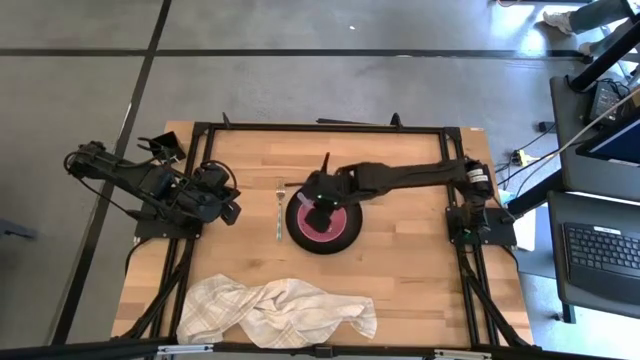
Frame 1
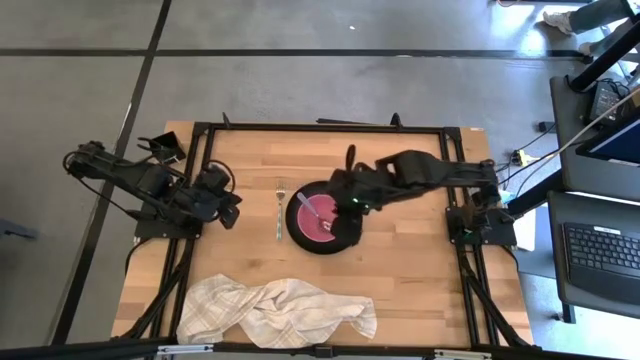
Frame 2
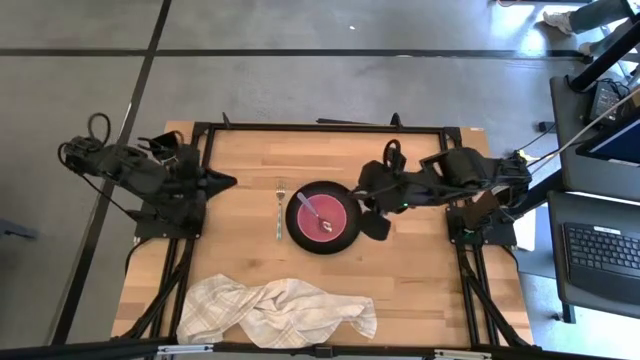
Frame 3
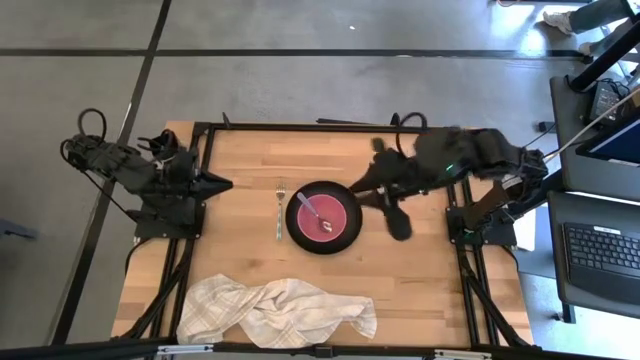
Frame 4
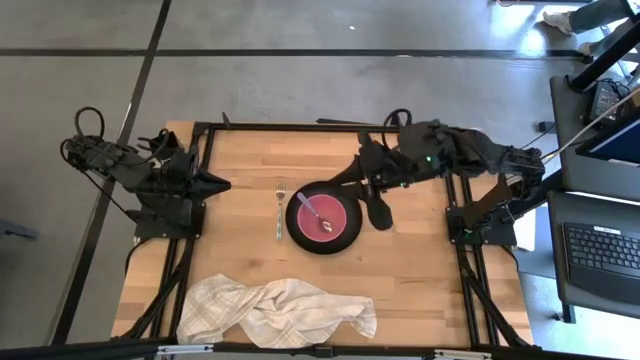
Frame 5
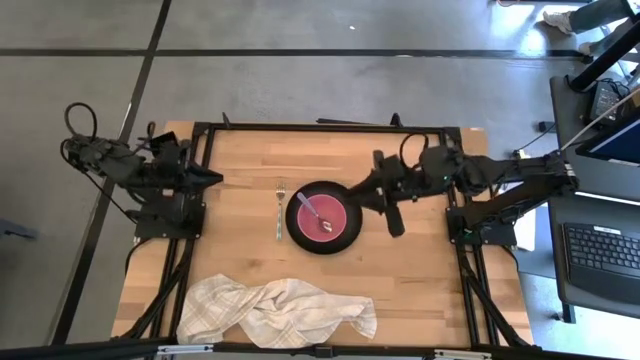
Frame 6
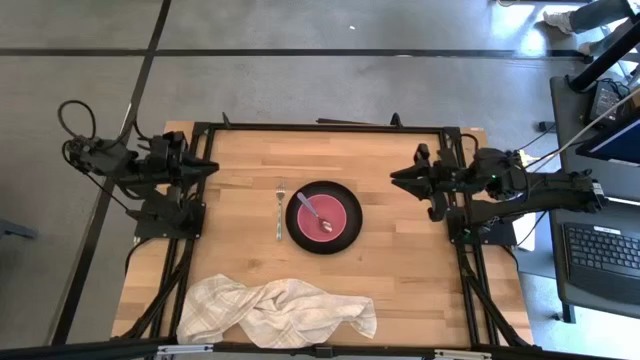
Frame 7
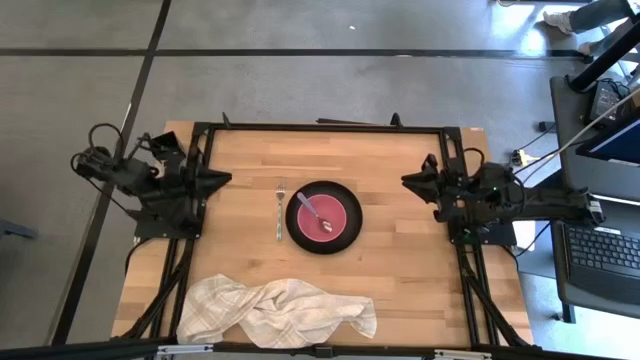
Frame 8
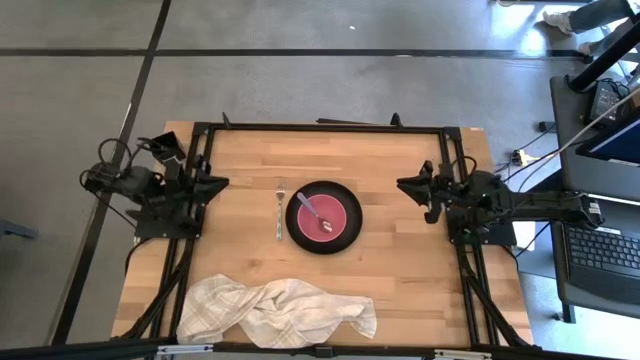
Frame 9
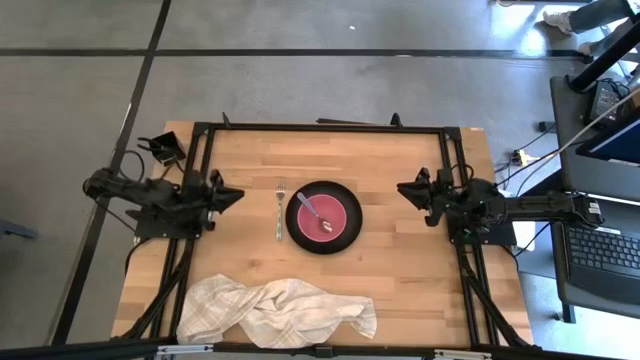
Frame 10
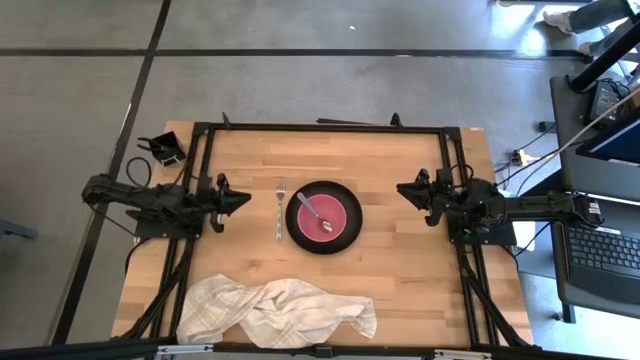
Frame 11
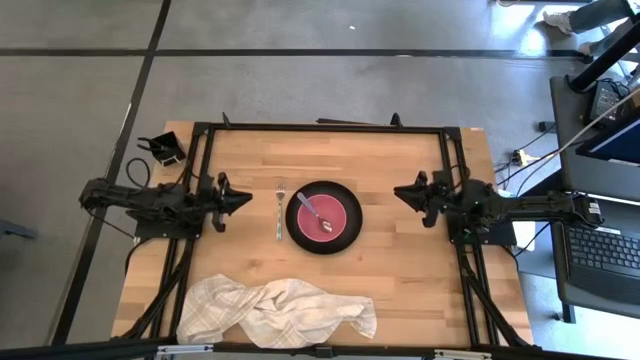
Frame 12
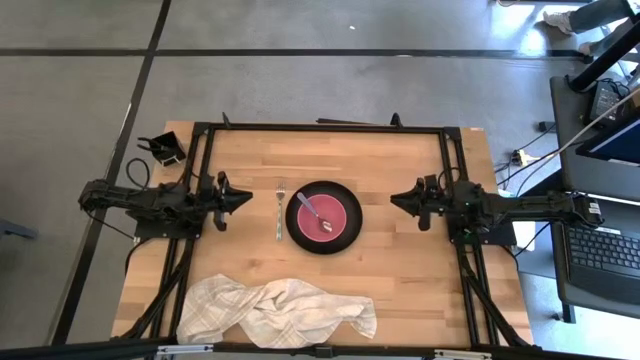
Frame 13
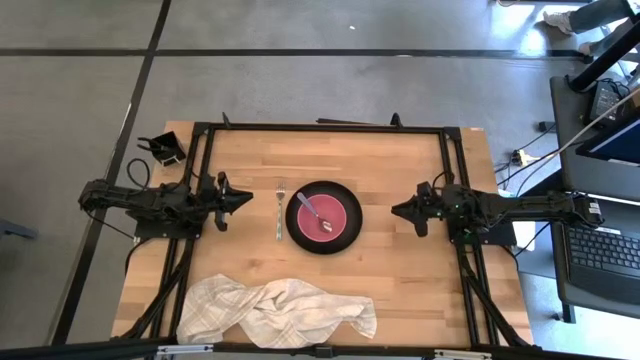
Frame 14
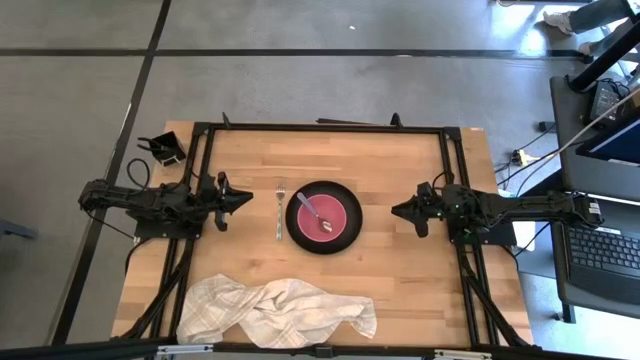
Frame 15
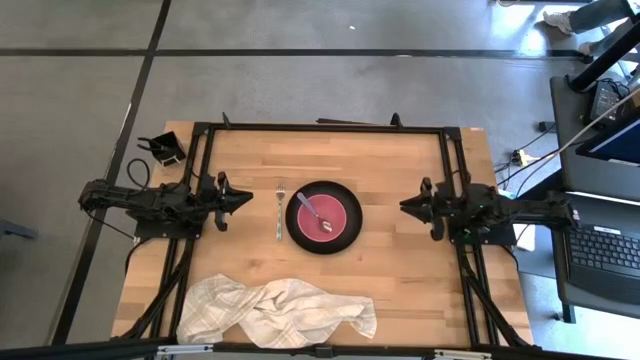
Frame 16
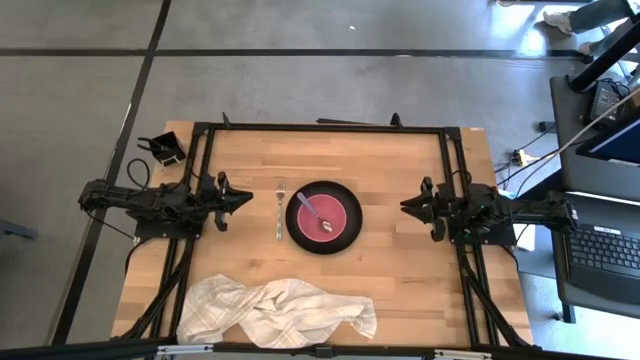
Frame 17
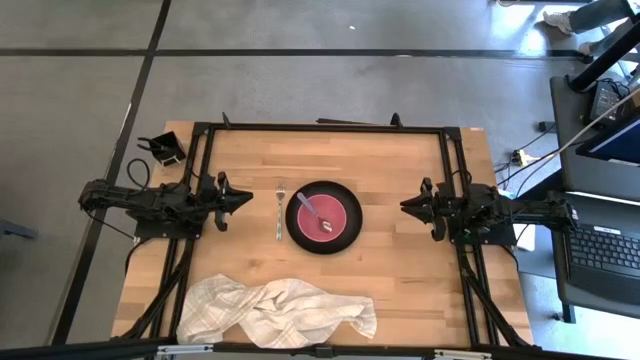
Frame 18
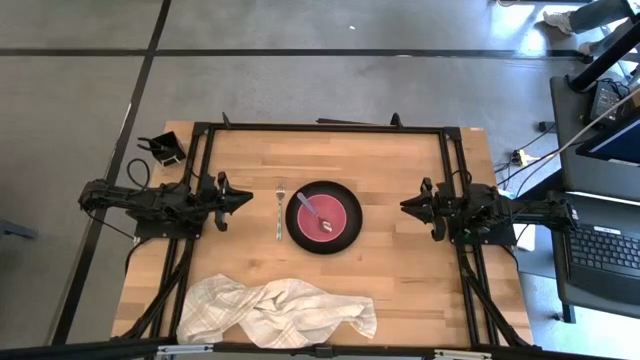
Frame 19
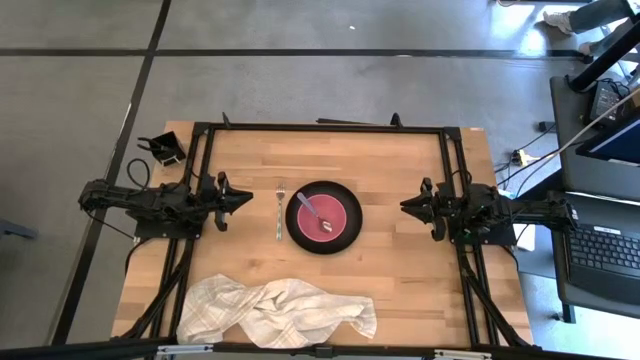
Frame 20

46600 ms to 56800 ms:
Task: Set table place
Return to Home Position

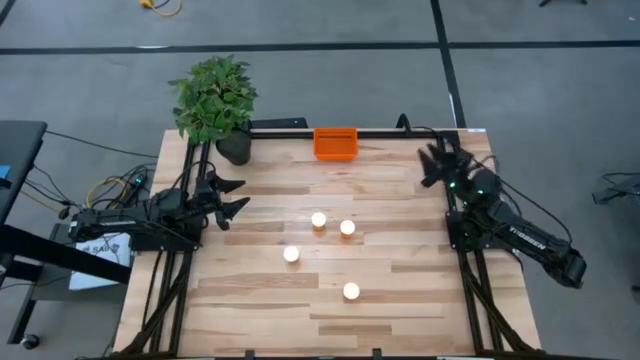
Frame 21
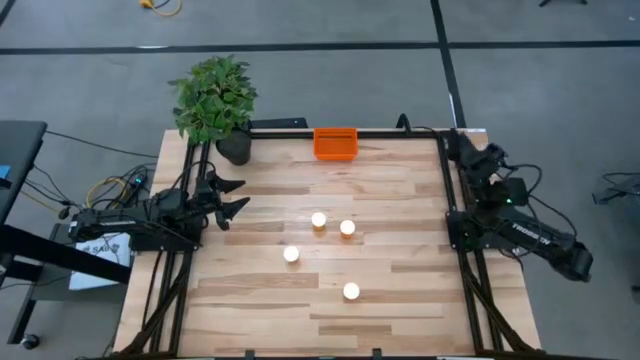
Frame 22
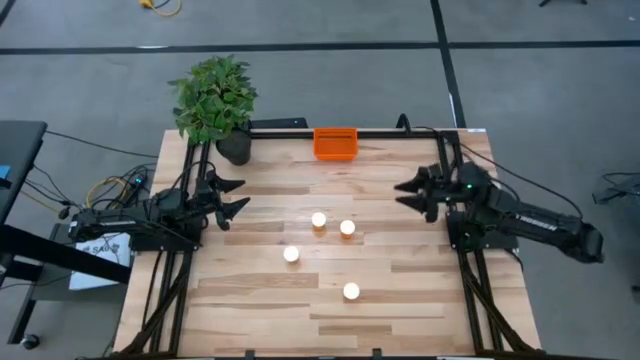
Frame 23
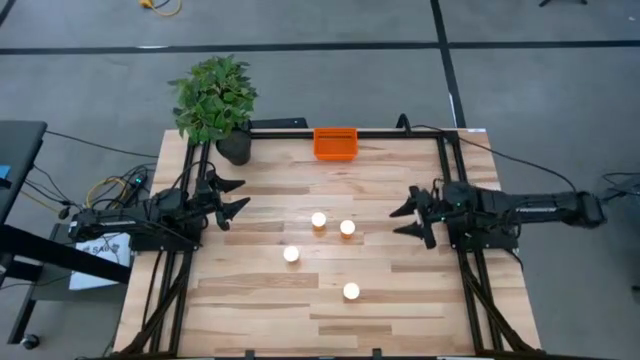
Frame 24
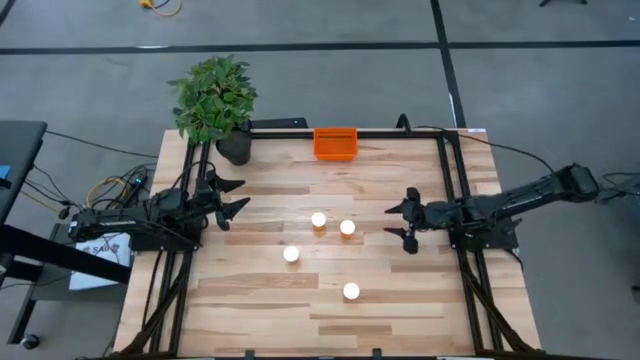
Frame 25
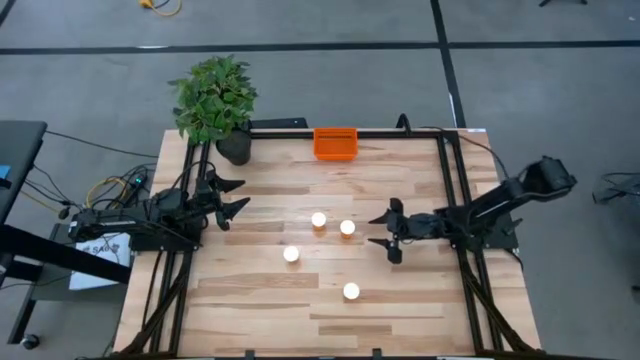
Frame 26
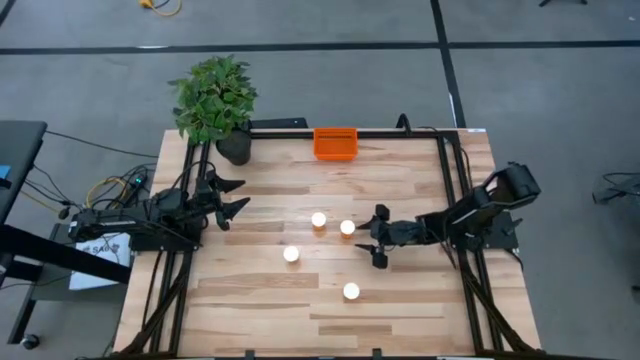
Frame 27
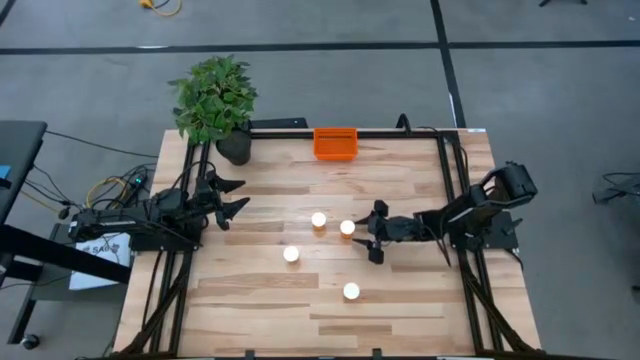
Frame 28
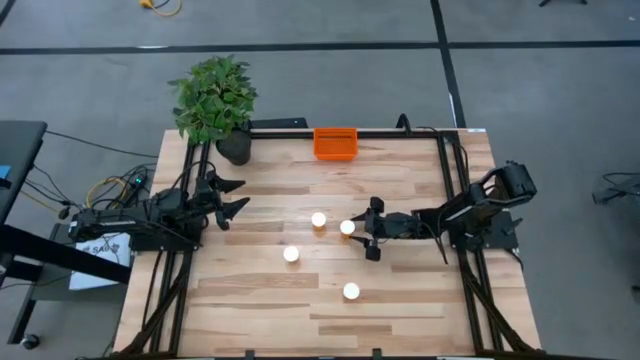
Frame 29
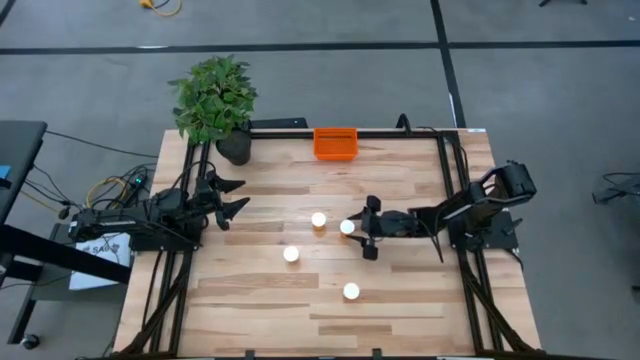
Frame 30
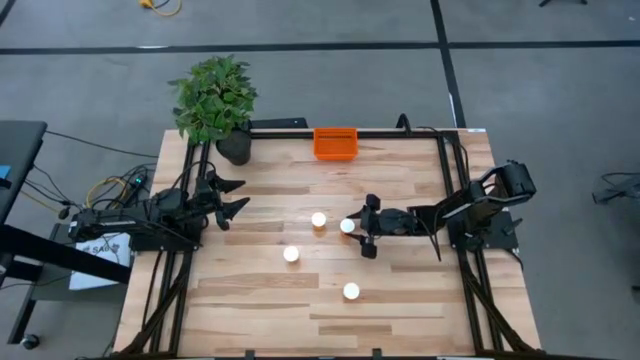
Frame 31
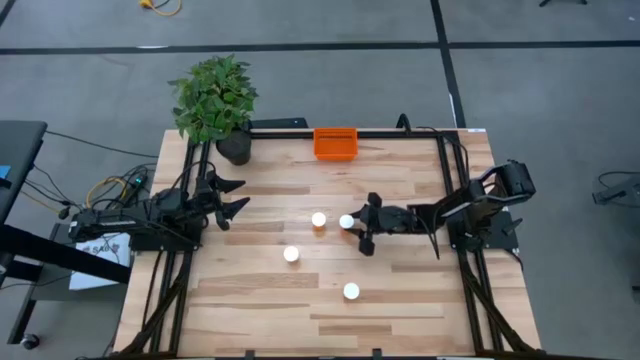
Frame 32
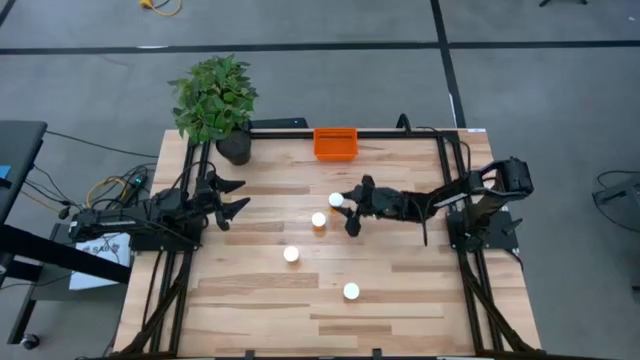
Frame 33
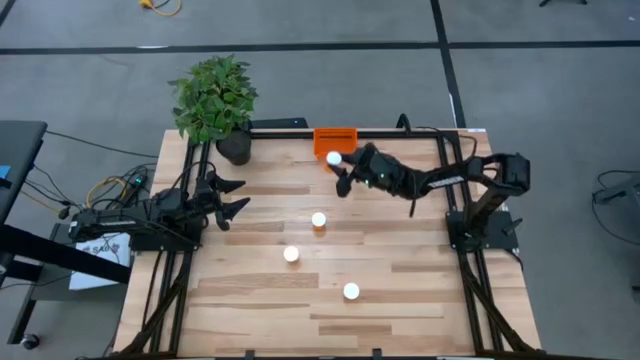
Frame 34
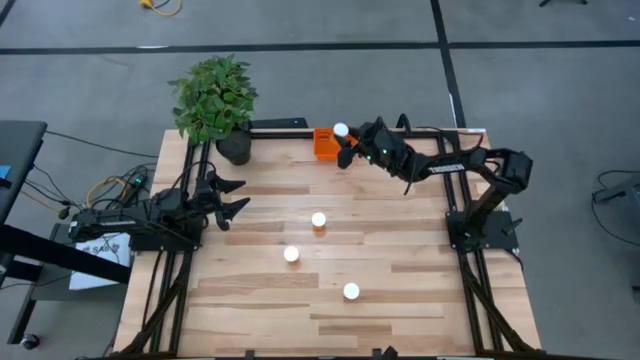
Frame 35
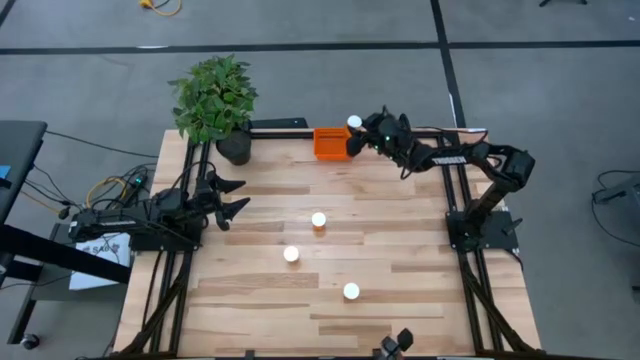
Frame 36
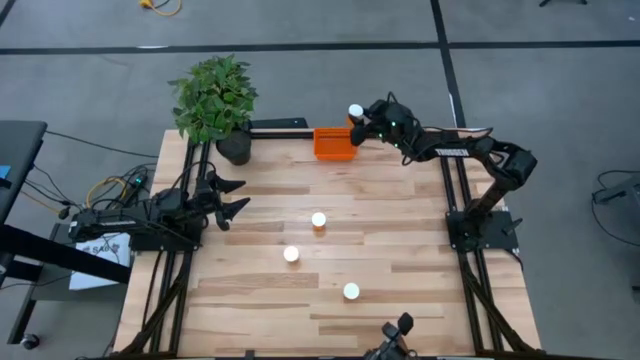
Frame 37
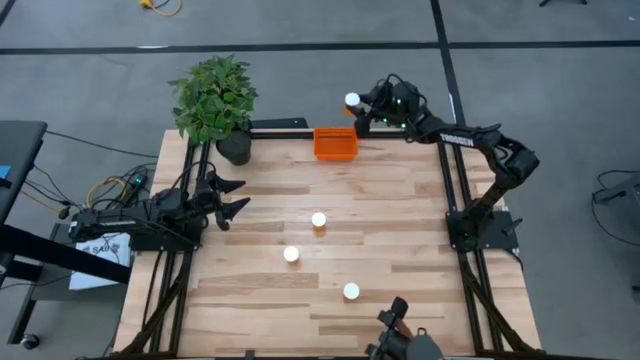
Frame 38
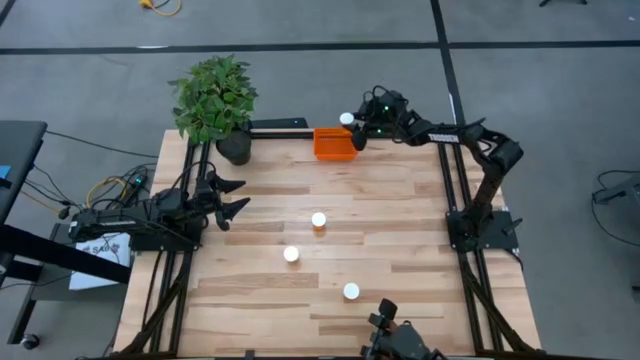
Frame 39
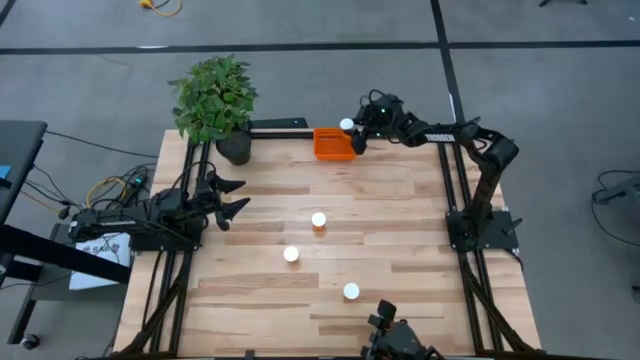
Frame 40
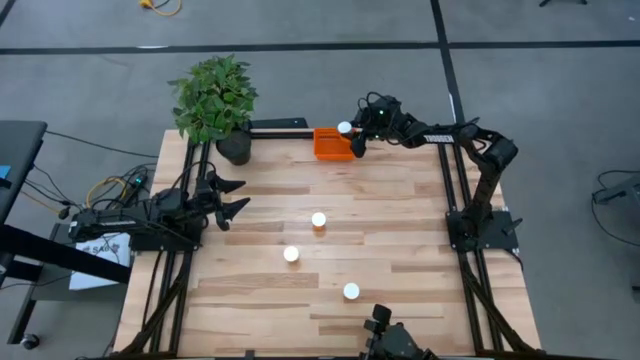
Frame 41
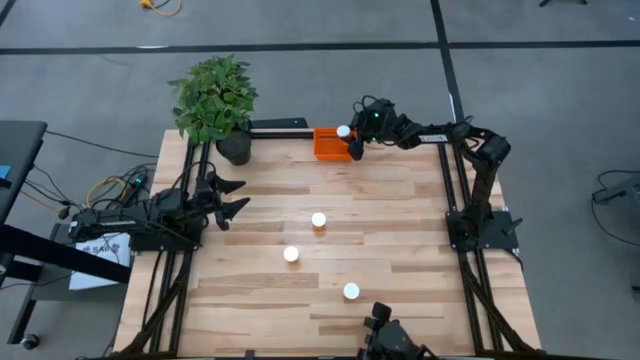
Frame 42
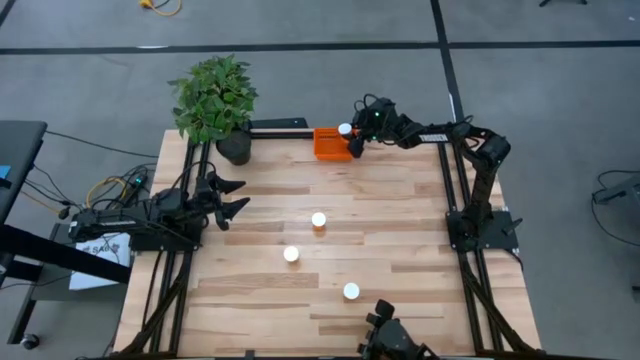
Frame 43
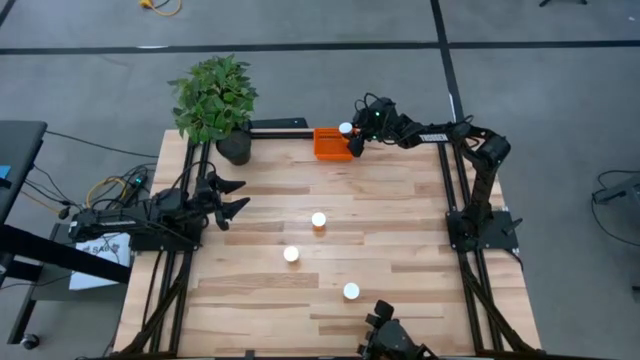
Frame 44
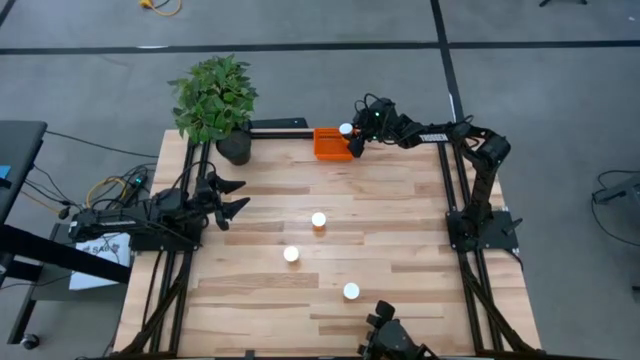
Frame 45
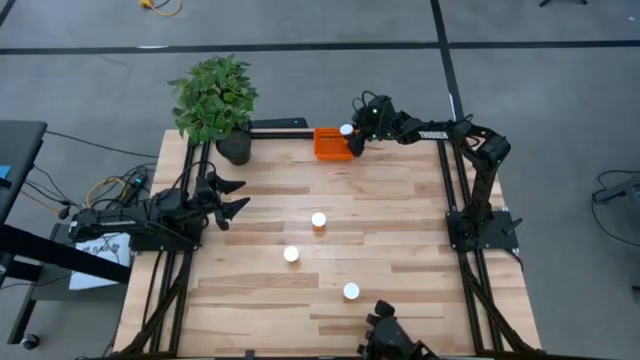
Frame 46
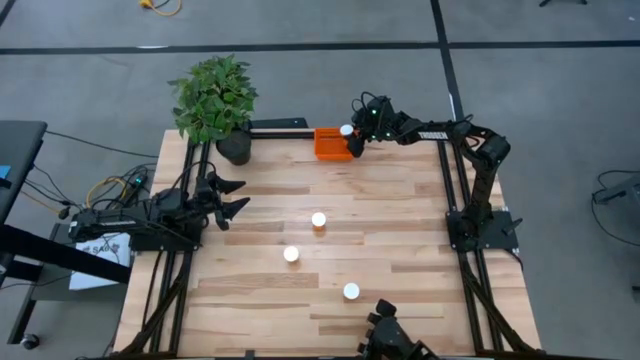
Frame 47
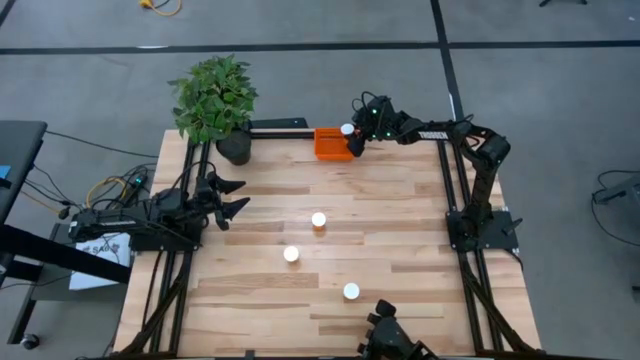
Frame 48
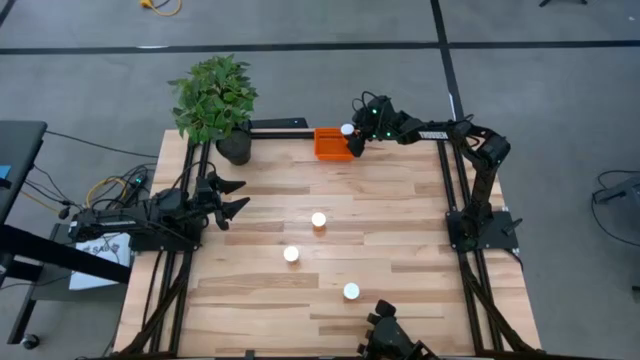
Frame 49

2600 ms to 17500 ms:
Task: Pick and place pill bottles into a basket
Put the orange pill bottle into the orange bin
